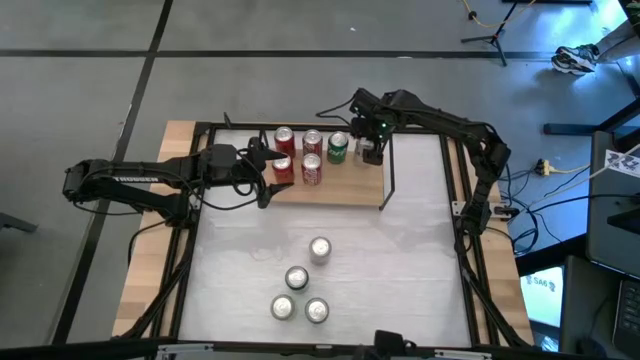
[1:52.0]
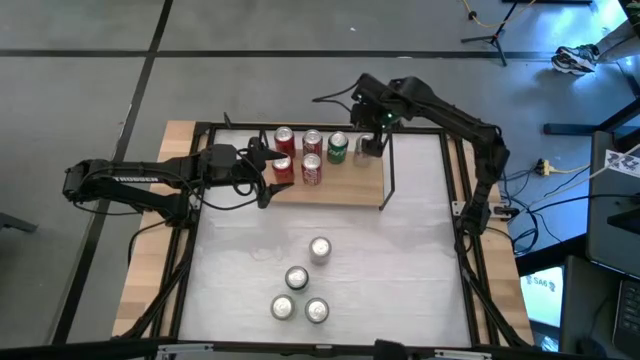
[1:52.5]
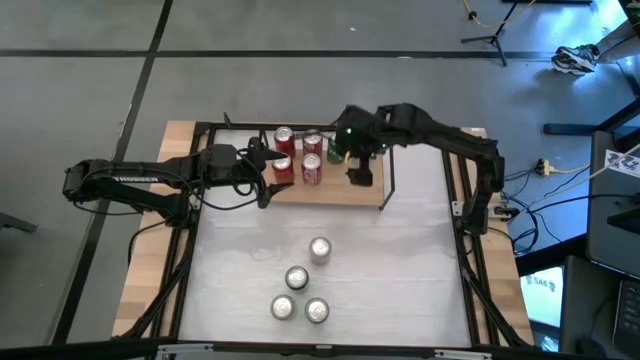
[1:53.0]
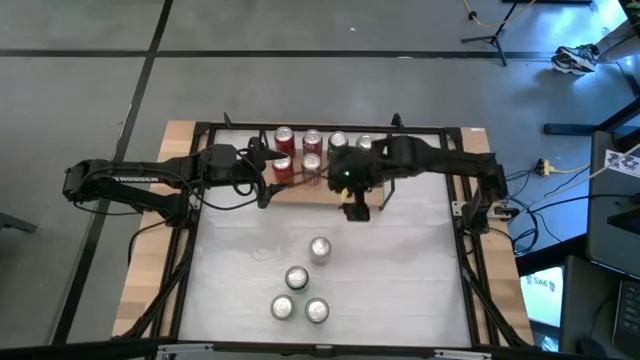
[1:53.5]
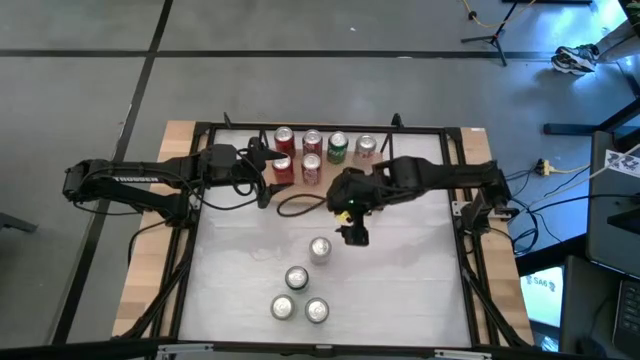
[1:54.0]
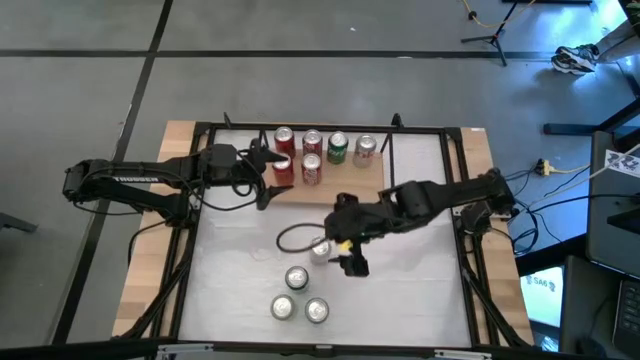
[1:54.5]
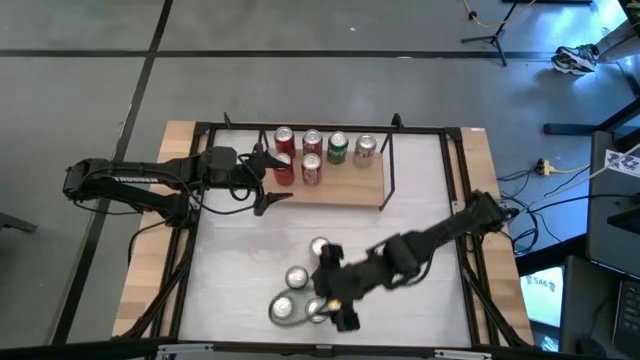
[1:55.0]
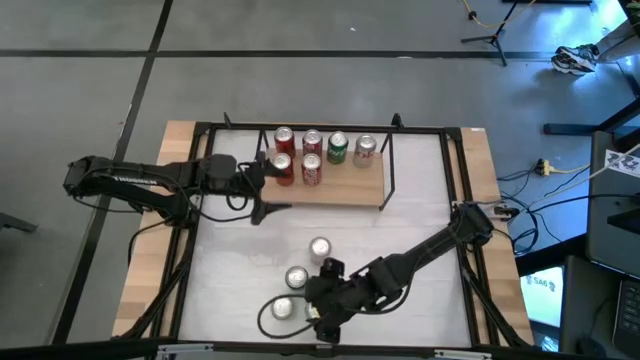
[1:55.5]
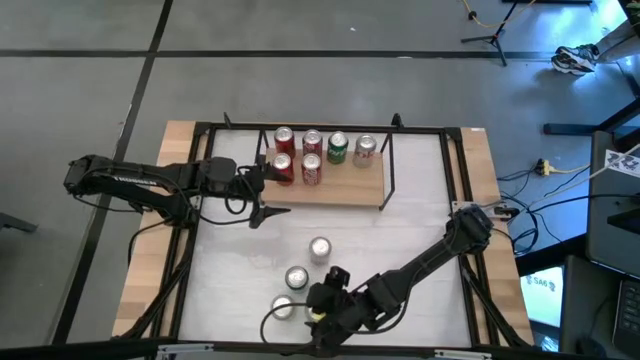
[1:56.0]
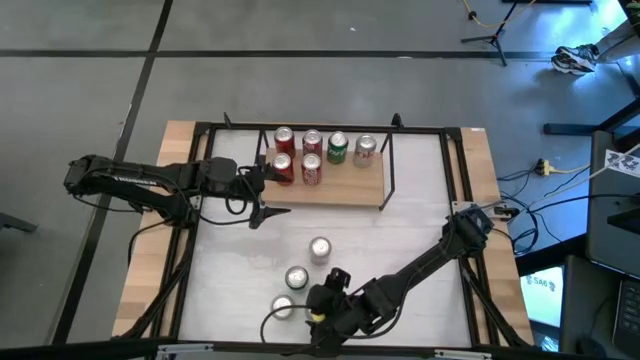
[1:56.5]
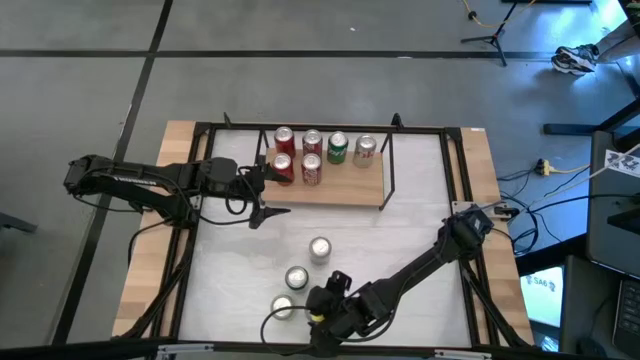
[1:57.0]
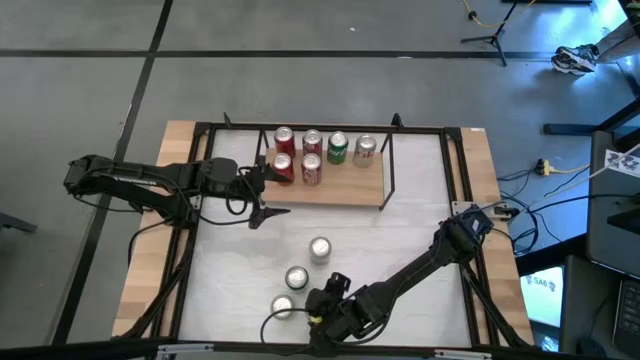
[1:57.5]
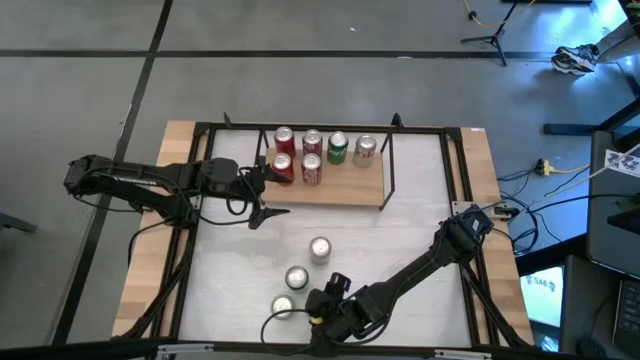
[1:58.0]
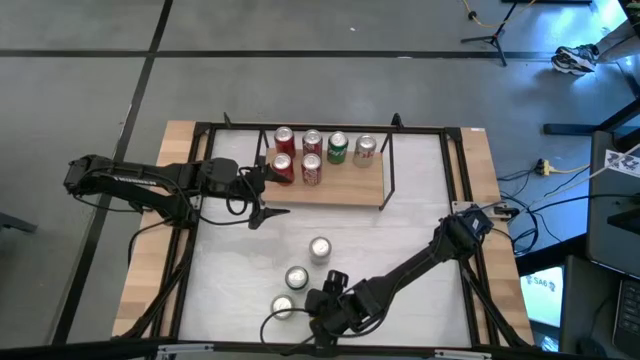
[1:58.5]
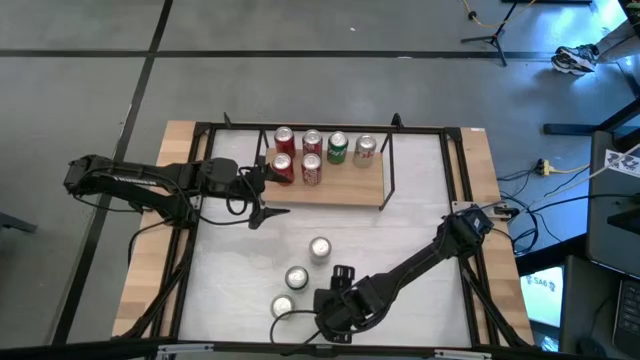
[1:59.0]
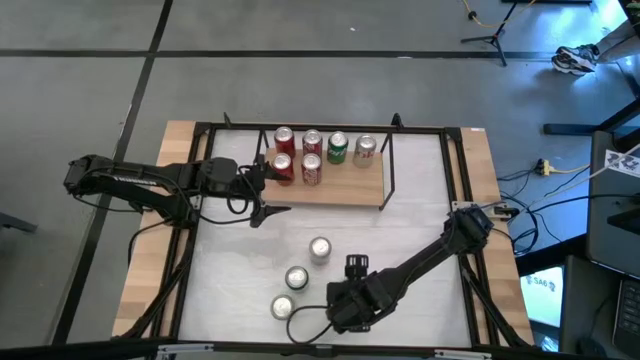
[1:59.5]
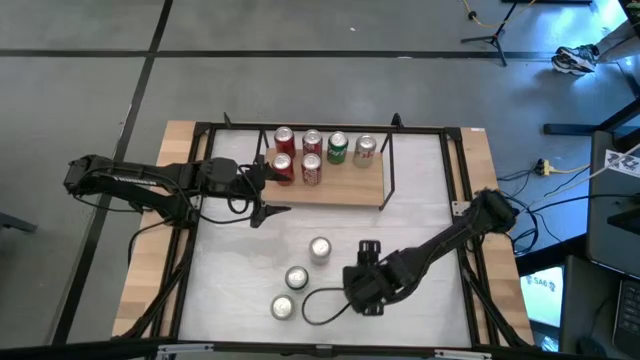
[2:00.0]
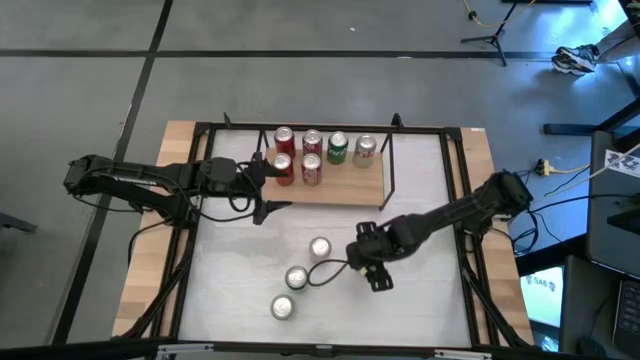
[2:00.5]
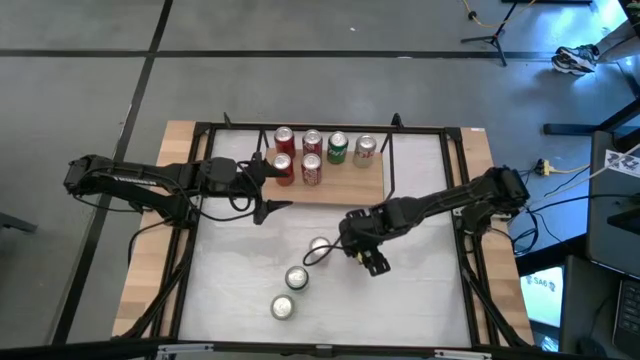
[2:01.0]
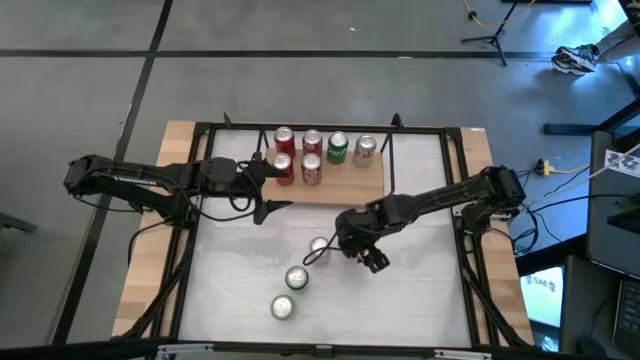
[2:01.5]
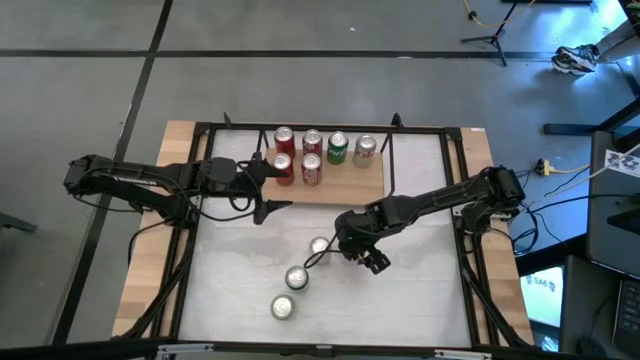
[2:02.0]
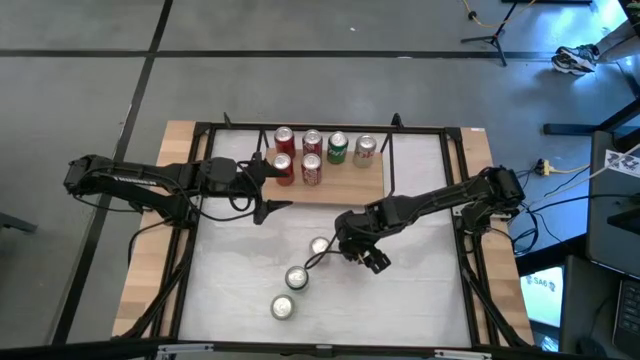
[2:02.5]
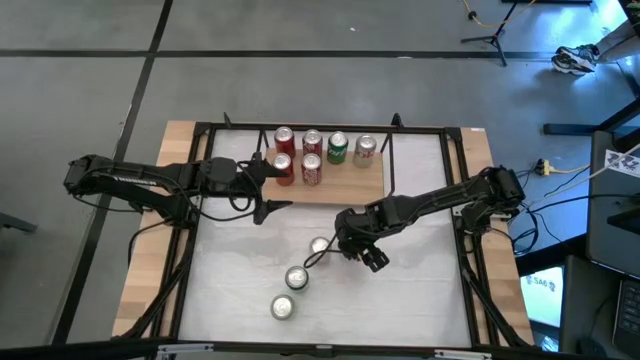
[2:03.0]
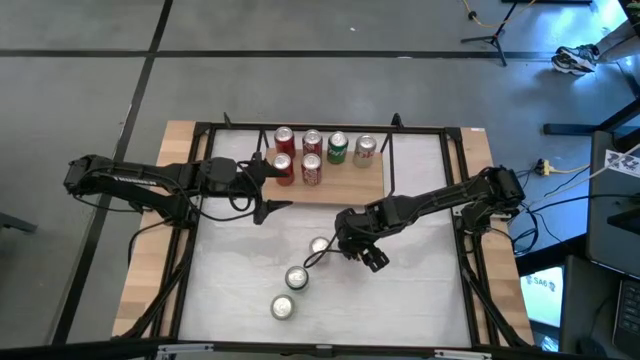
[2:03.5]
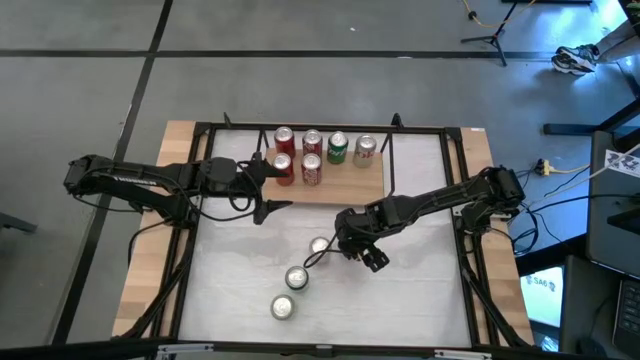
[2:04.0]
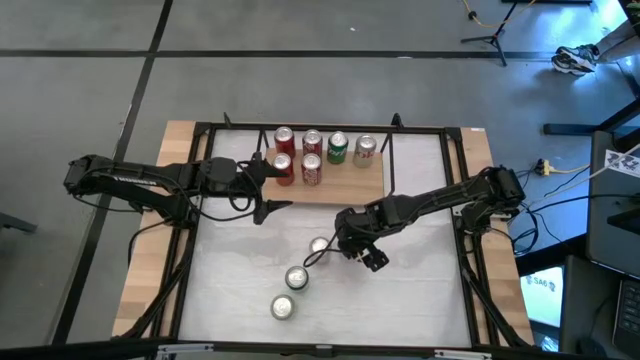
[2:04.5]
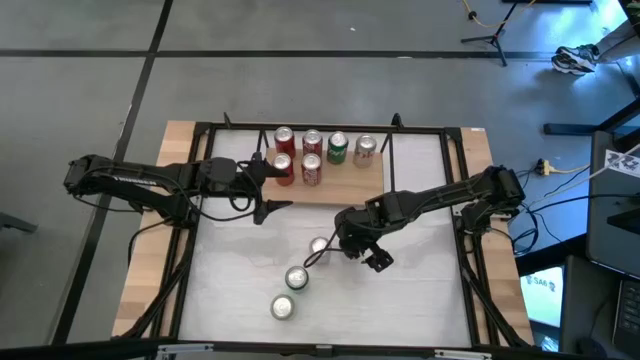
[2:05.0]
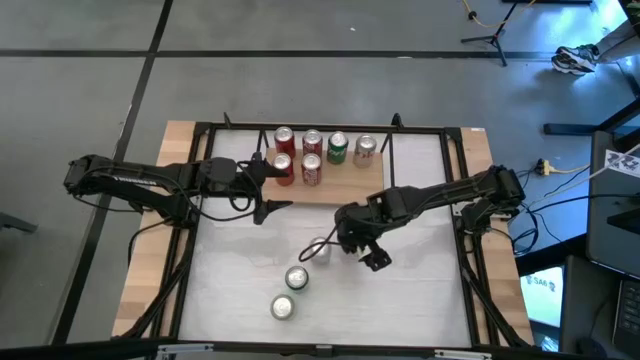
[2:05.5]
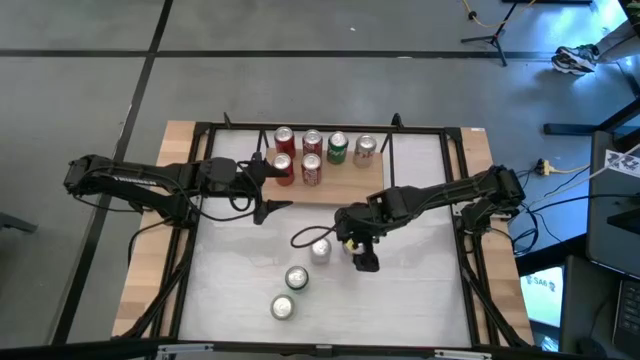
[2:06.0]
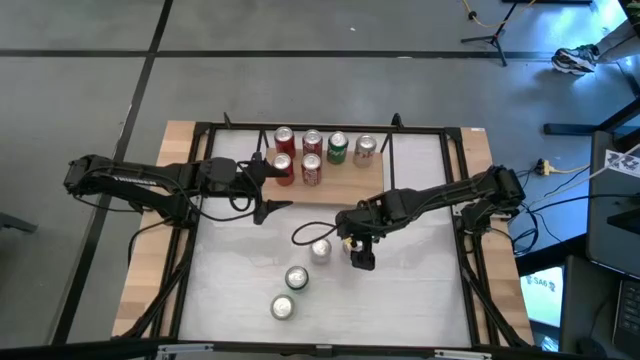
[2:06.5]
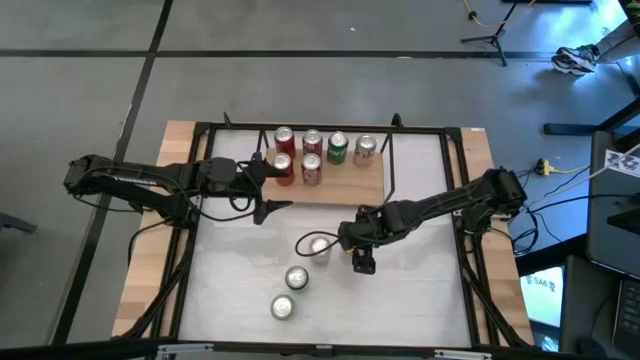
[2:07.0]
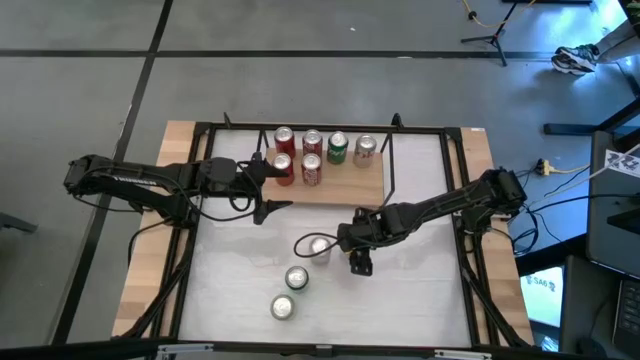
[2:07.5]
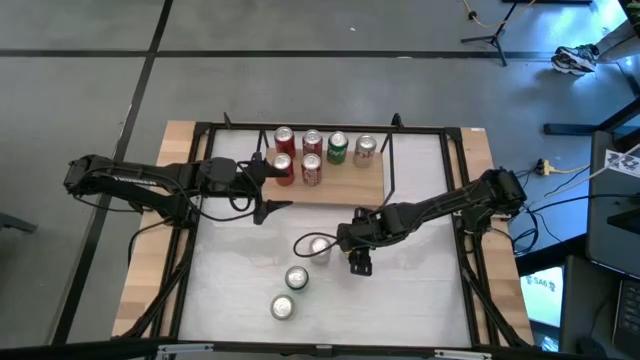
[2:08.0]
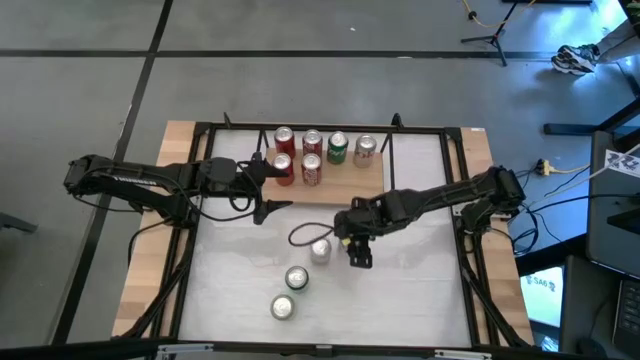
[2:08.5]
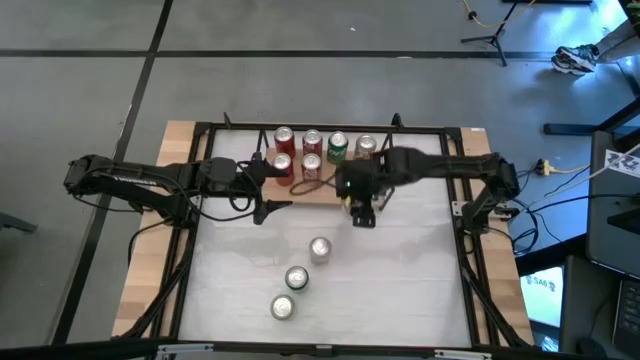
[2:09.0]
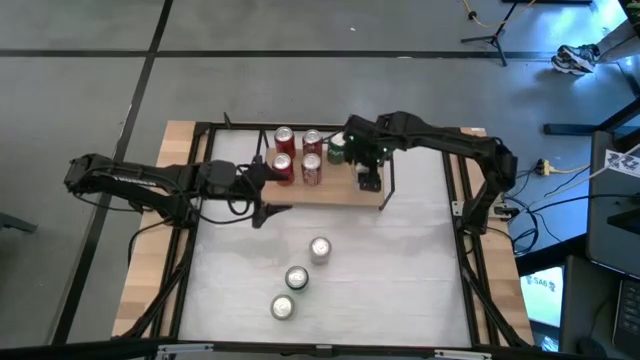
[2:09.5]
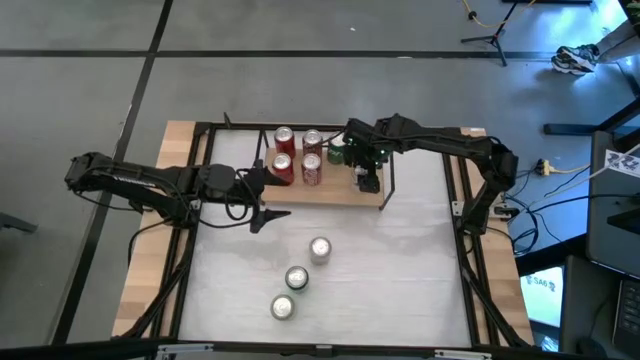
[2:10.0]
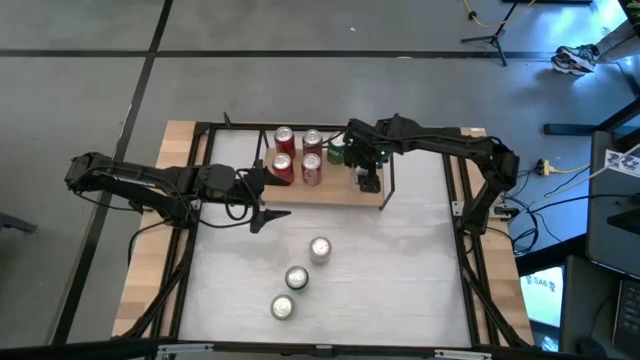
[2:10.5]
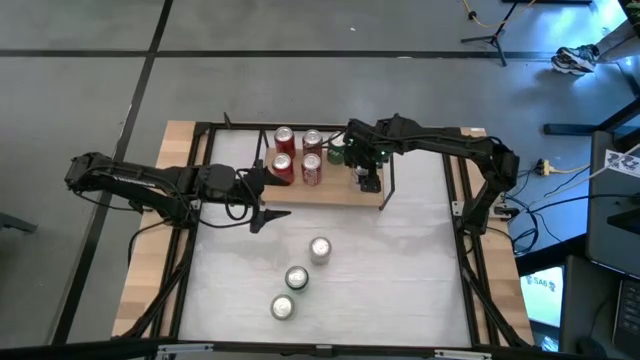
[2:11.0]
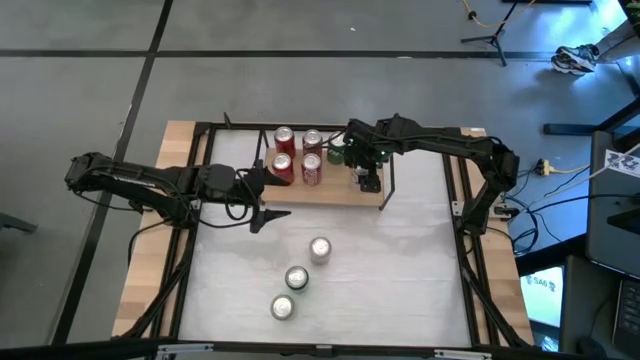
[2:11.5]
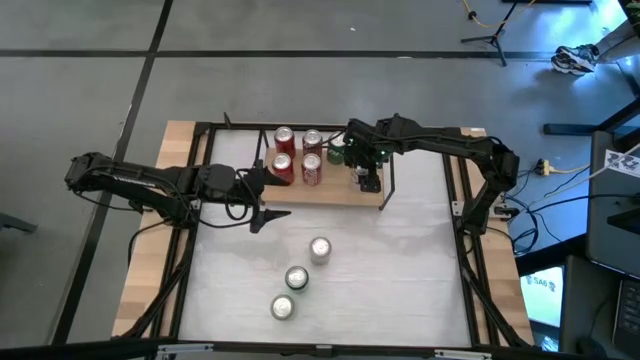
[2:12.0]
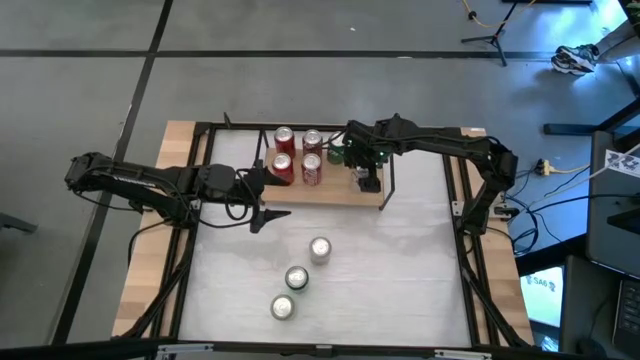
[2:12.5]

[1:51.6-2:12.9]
Task: Place canned beverage on shelf
Put the silver soda can on the shelf aligned with the other silver soda can
